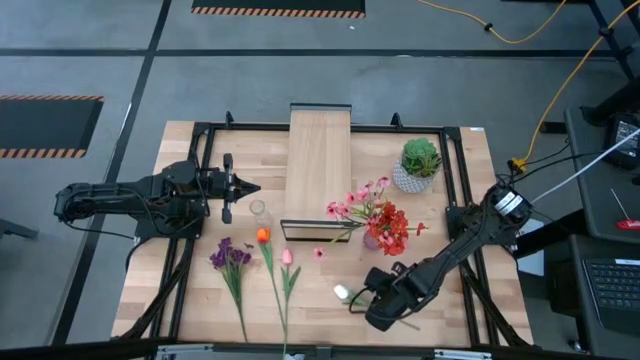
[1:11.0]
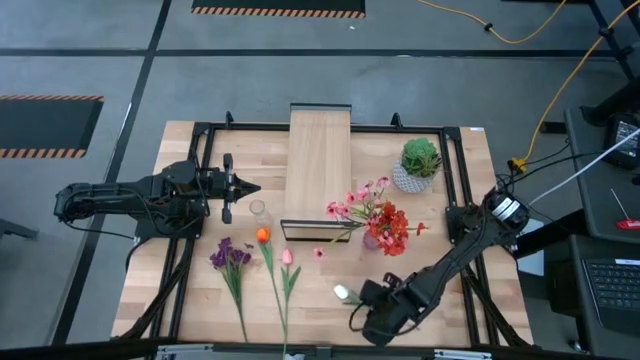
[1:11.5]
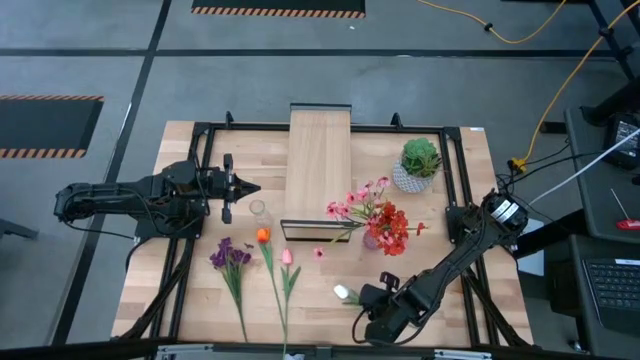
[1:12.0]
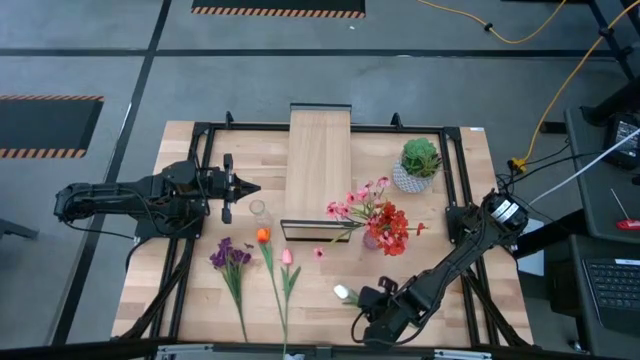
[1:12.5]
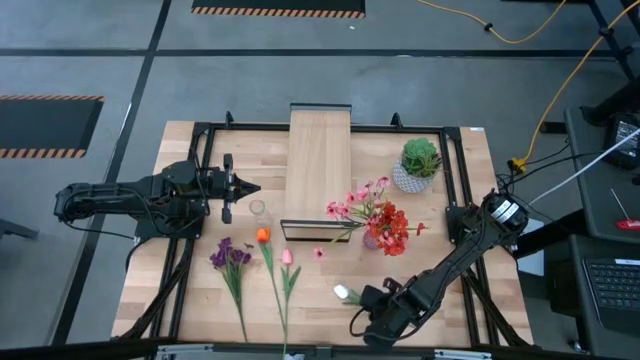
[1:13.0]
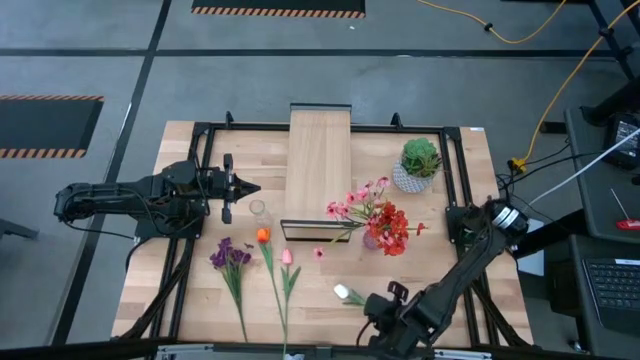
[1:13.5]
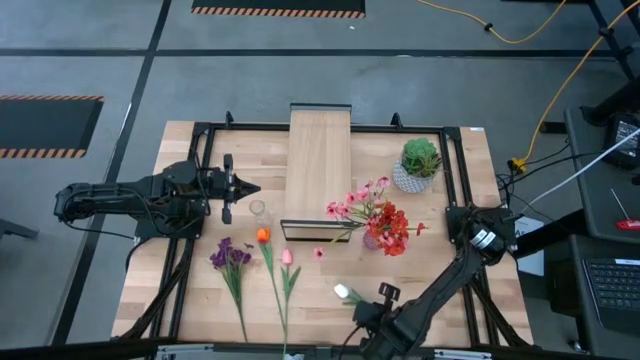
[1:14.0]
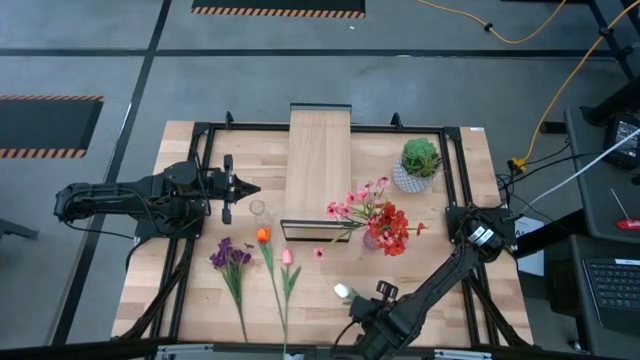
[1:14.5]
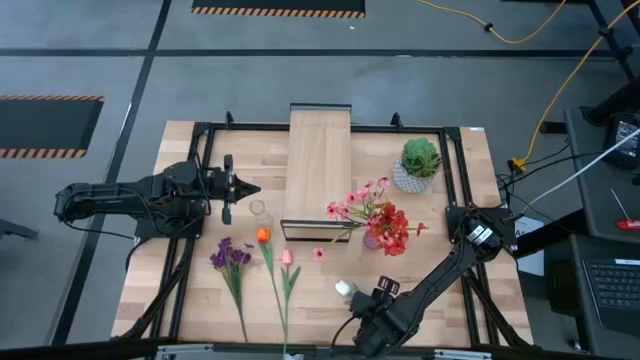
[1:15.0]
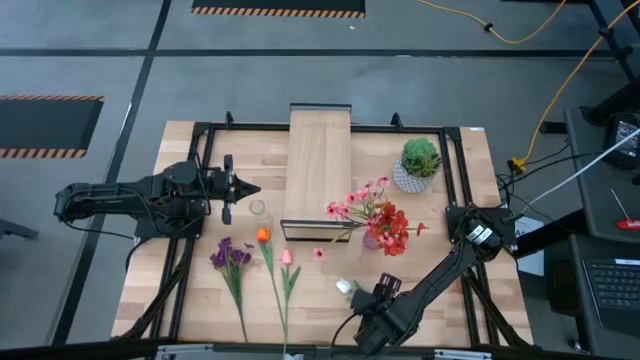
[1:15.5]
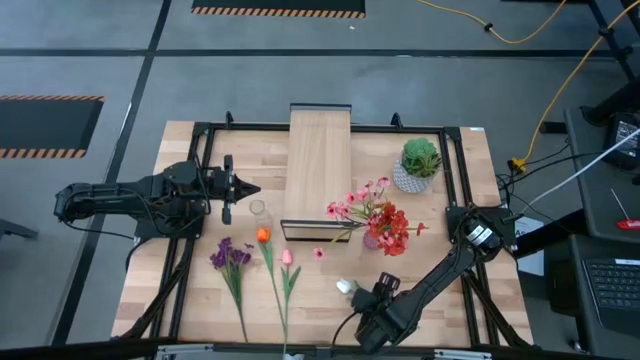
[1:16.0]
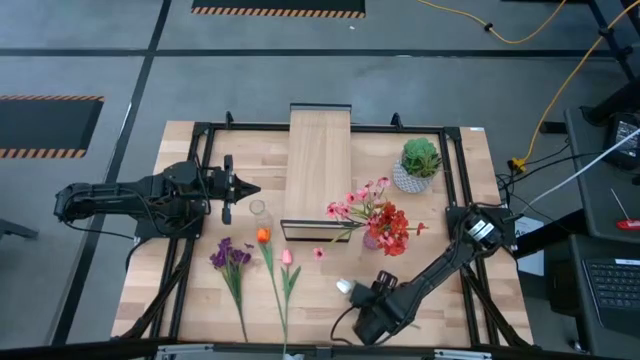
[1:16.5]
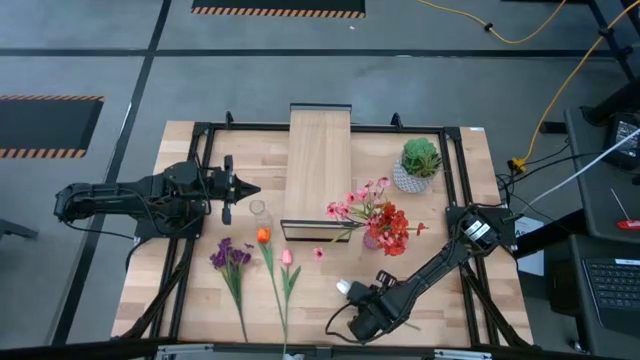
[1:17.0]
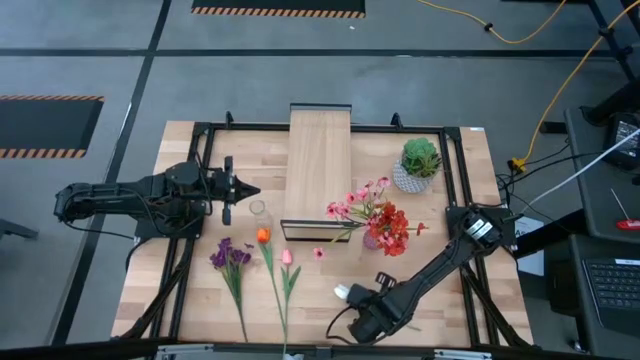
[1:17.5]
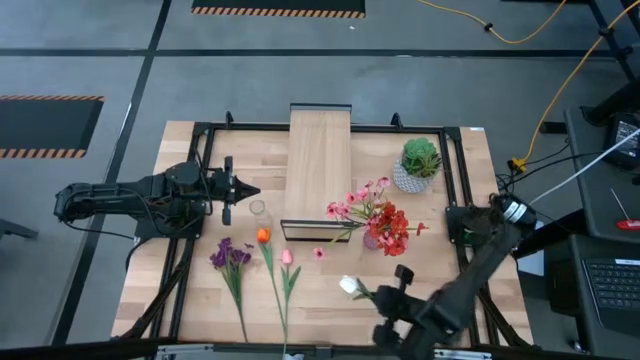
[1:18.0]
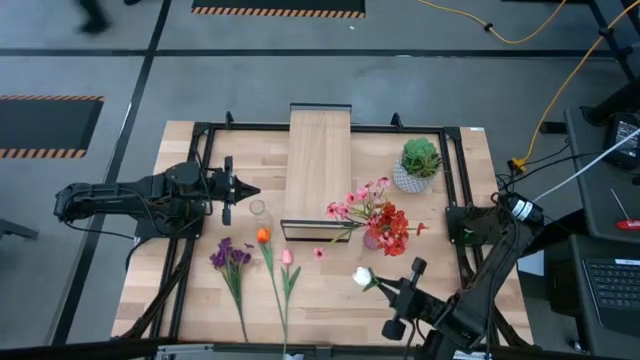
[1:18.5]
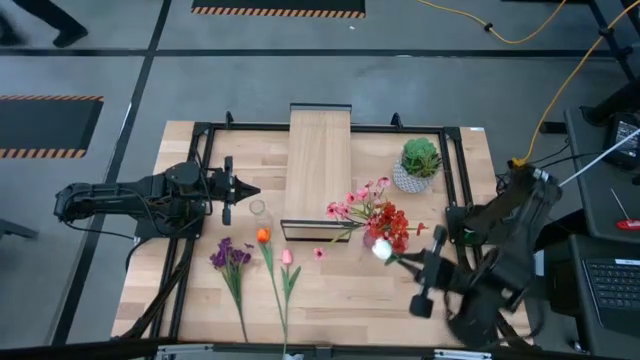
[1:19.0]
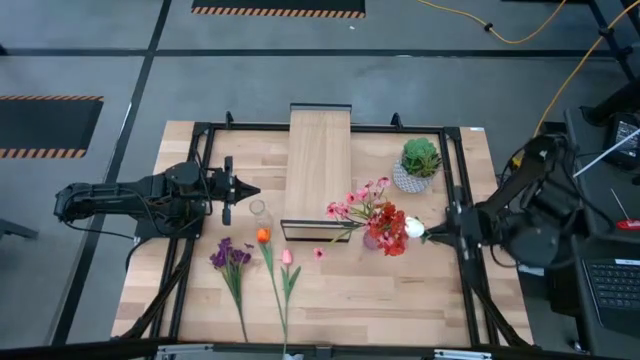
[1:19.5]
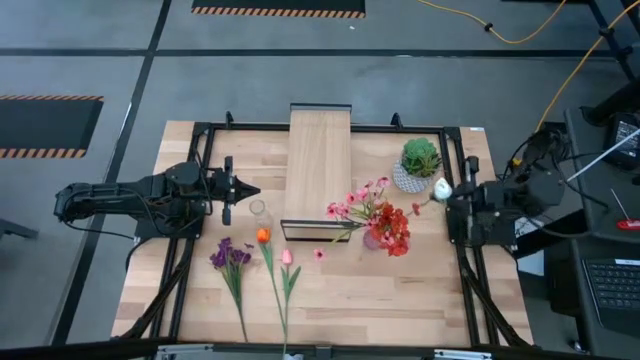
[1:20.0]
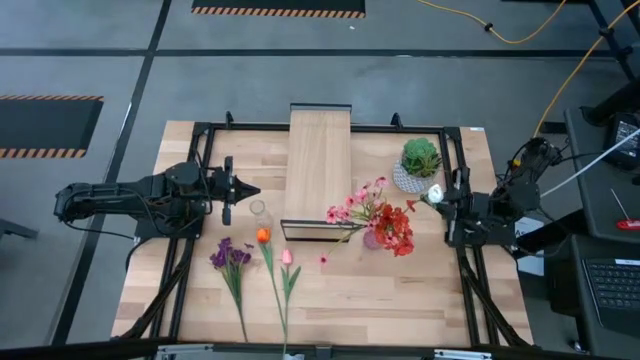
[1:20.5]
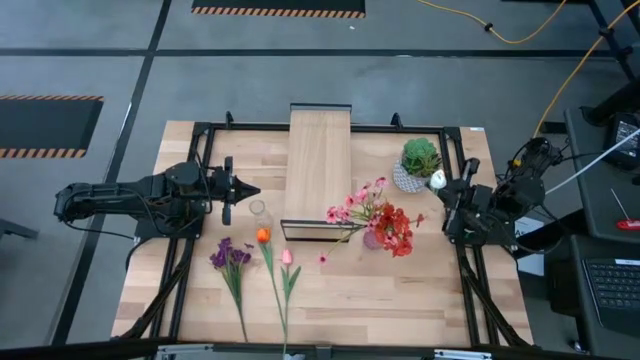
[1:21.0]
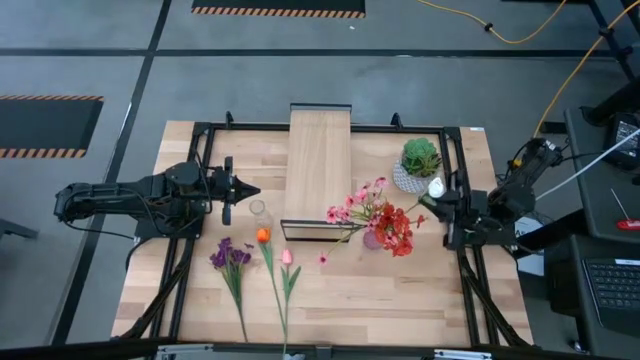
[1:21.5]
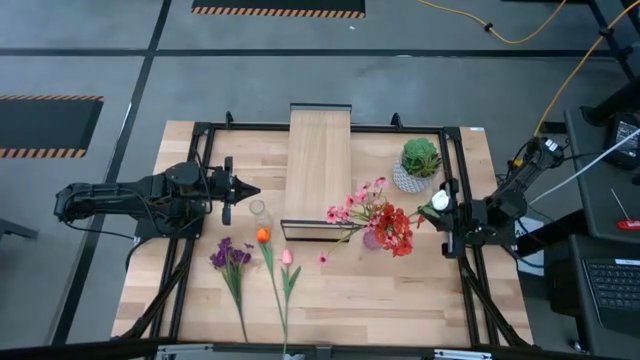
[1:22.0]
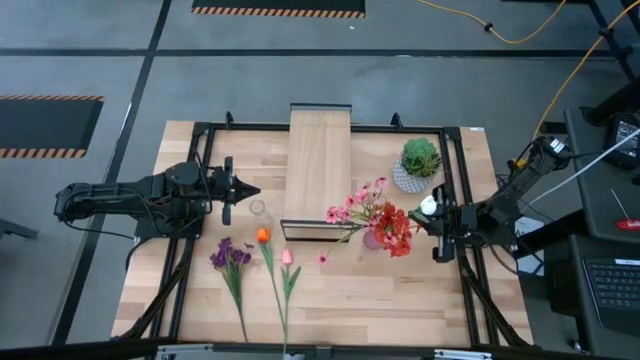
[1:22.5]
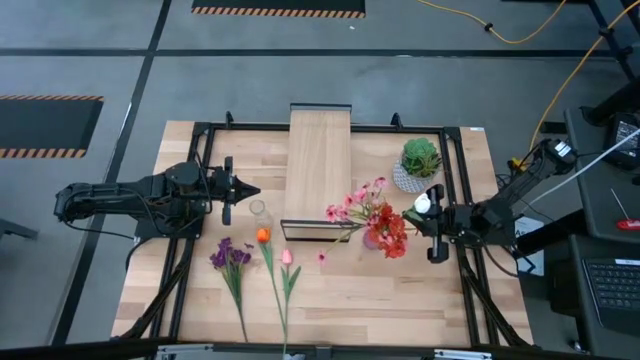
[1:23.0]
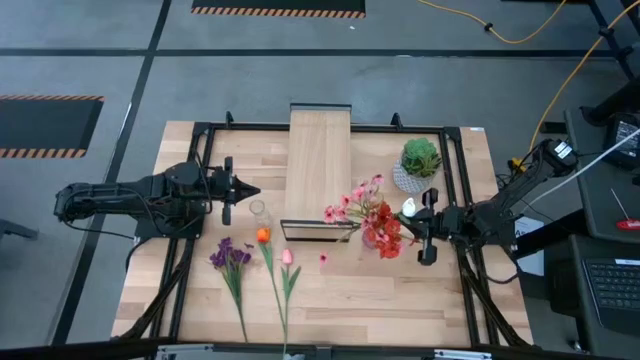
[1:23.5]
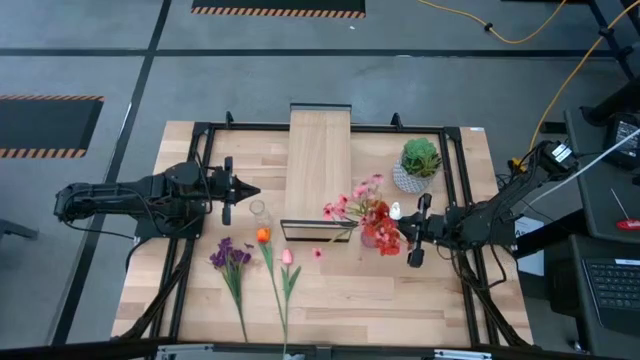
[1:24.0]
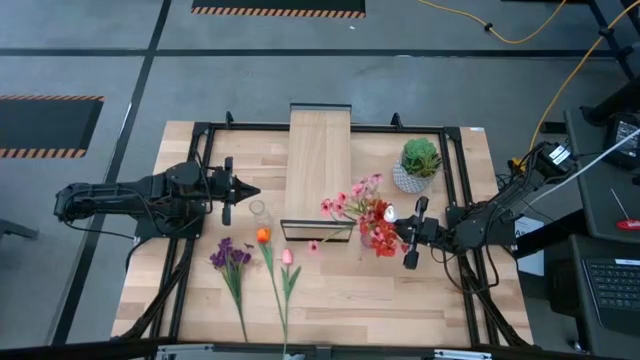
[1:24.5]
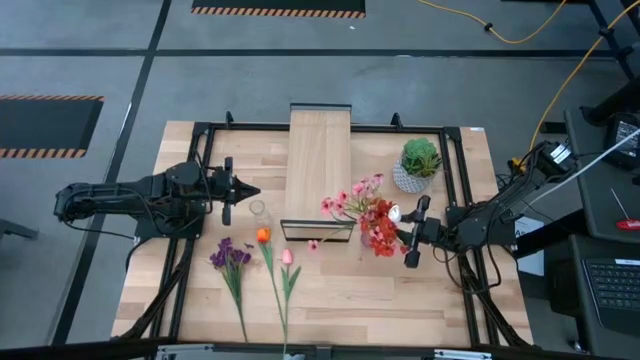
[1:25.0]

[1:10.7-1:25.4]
Task: Pick and place flowers into a vace then onto a shelf
Put the white tulip into the purple vase

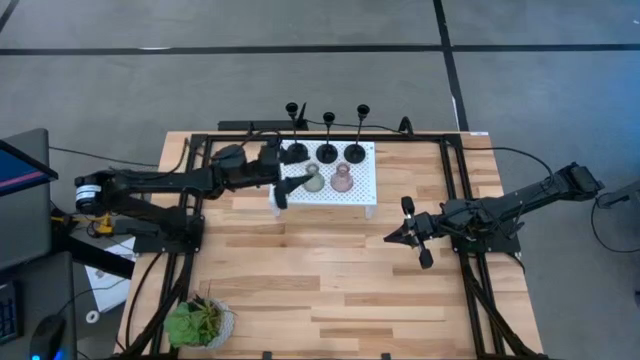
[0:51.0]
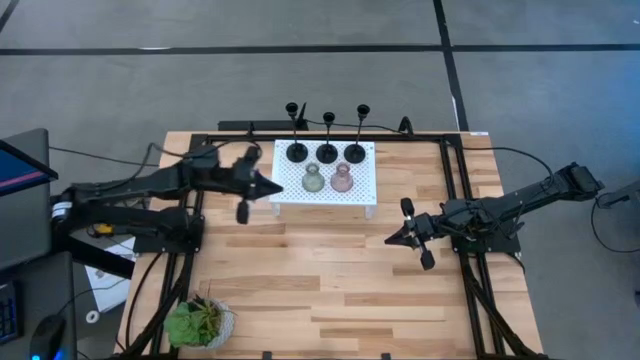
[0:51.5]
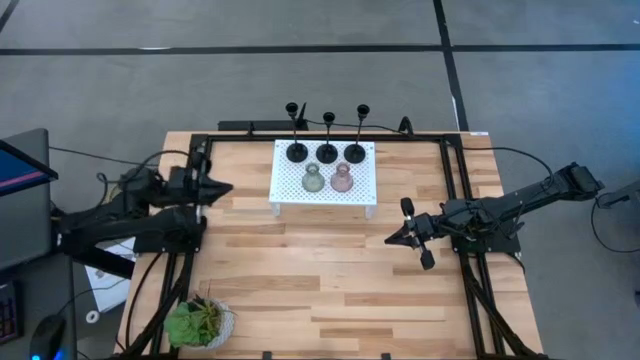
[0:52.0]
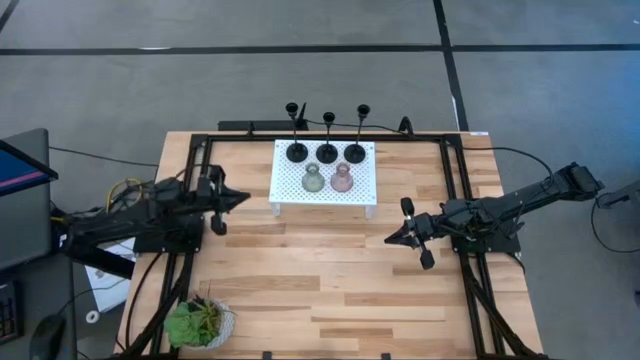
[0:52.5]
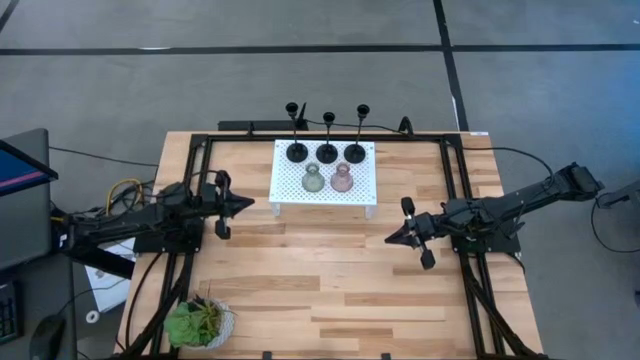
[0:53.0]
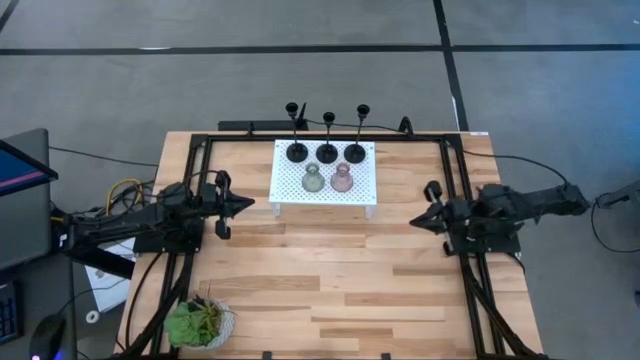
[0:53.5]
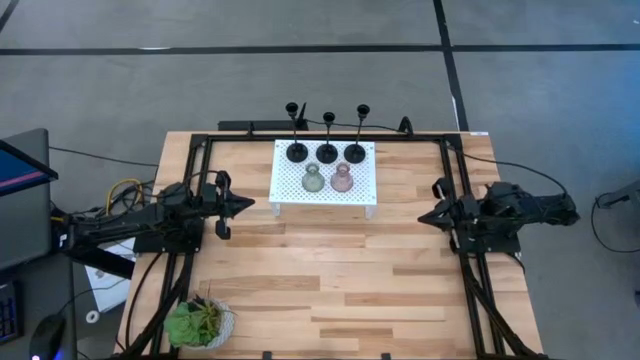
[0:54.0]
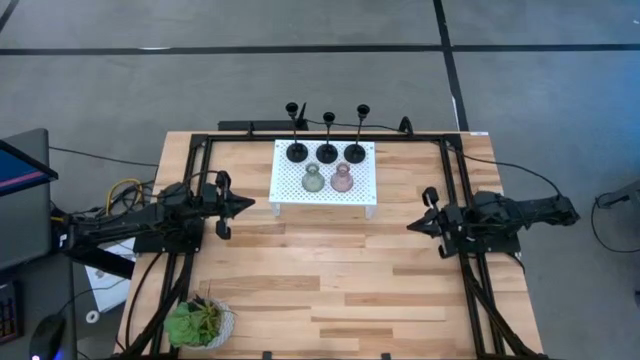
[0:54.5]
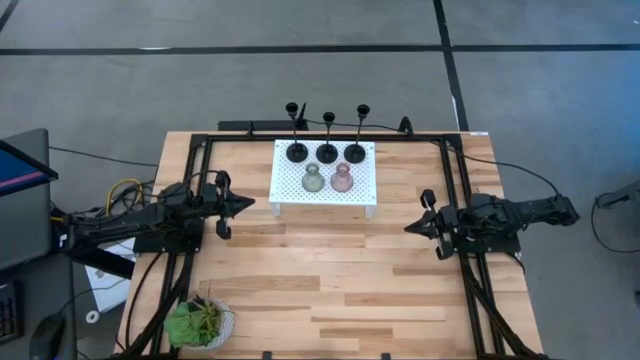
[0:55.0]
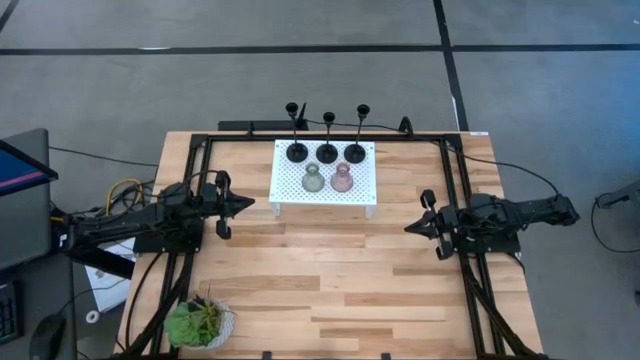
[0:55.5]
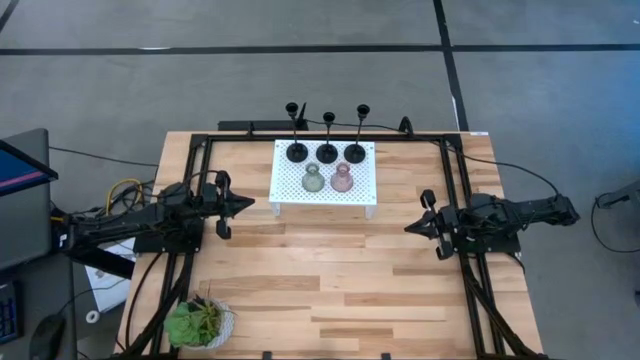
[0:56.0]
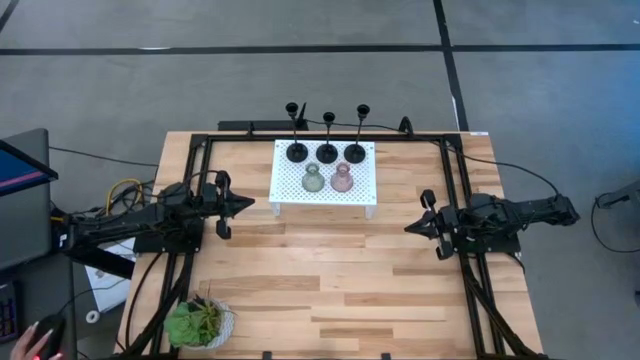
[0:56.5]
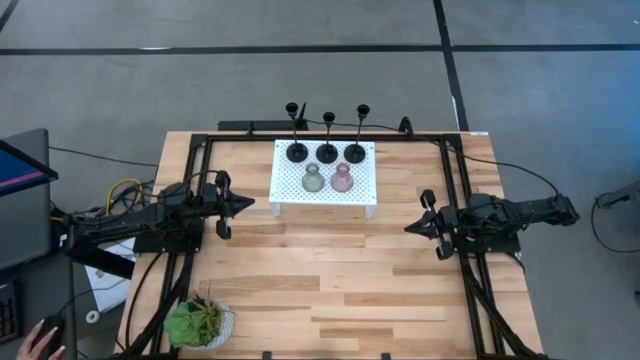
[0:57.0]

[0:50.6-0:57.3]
Task: Pick & Place candle stick holders
Return to Home Position
